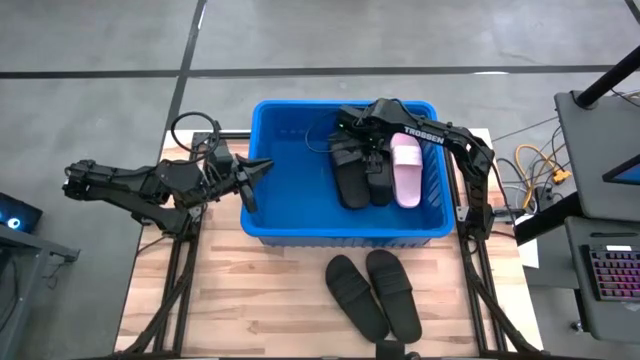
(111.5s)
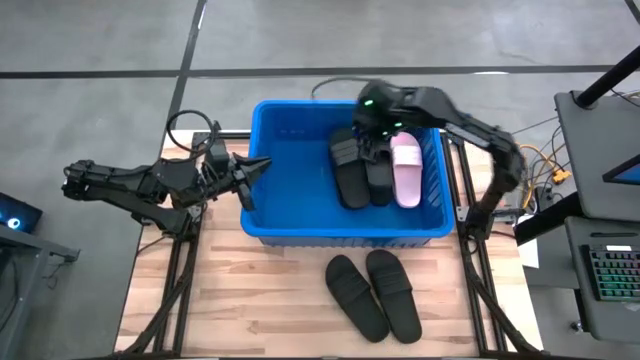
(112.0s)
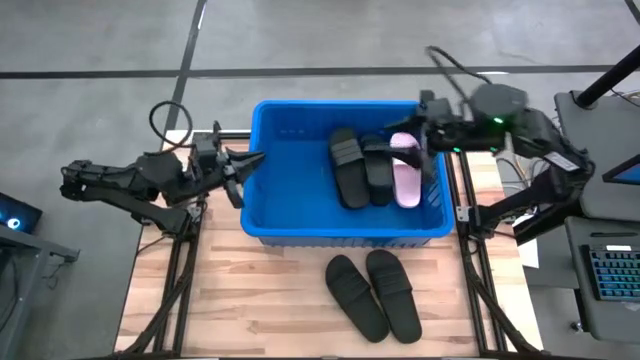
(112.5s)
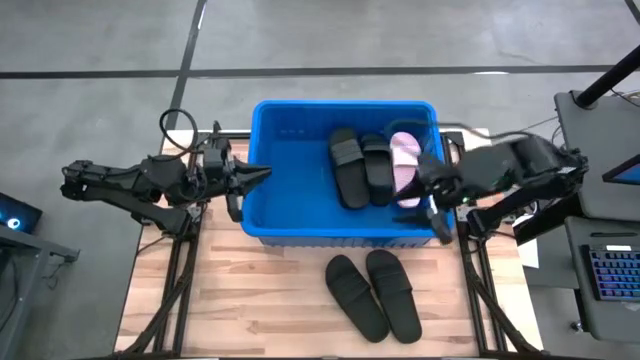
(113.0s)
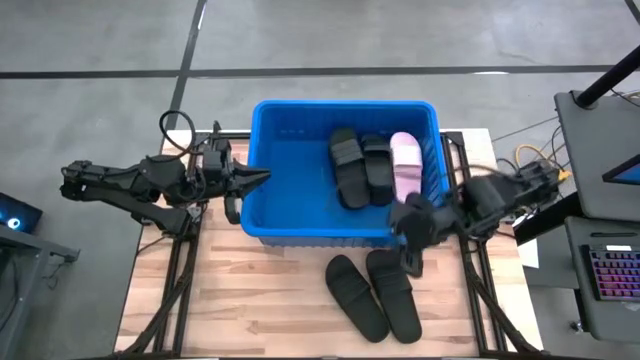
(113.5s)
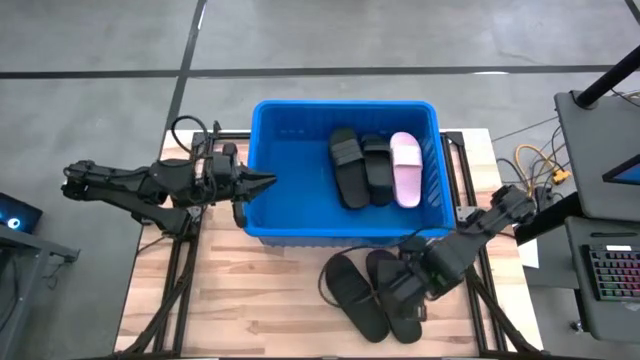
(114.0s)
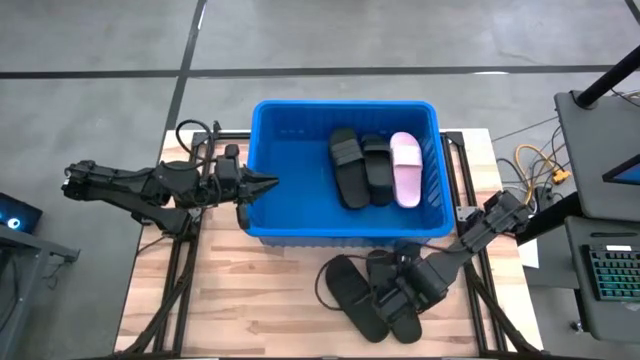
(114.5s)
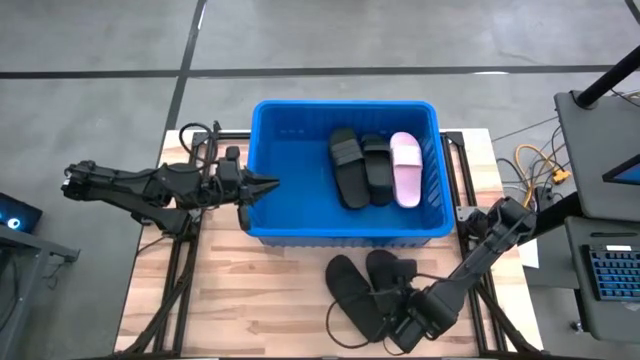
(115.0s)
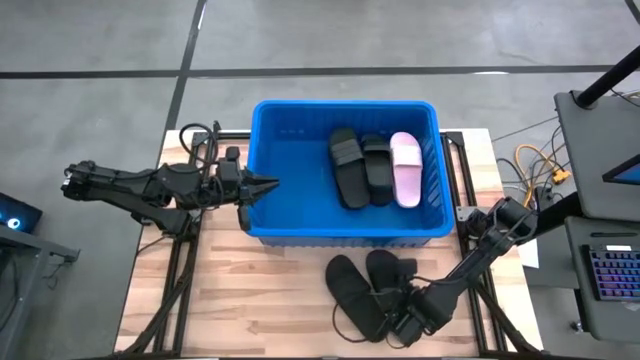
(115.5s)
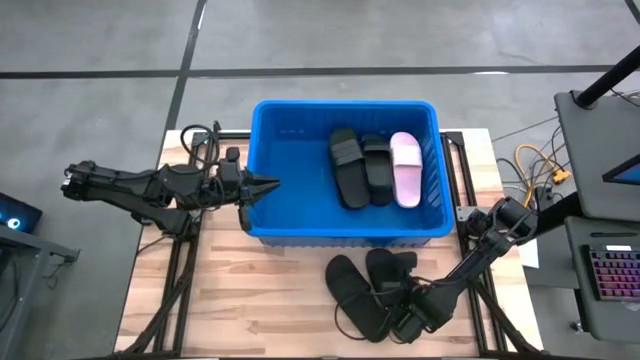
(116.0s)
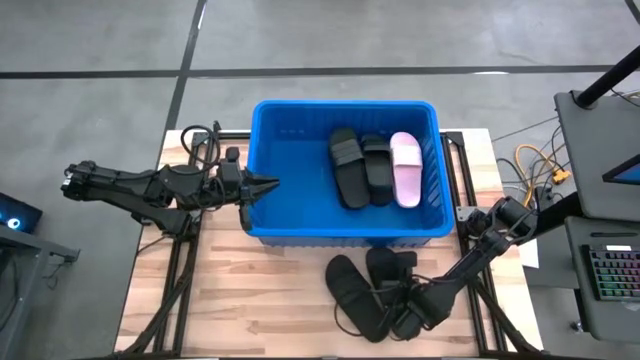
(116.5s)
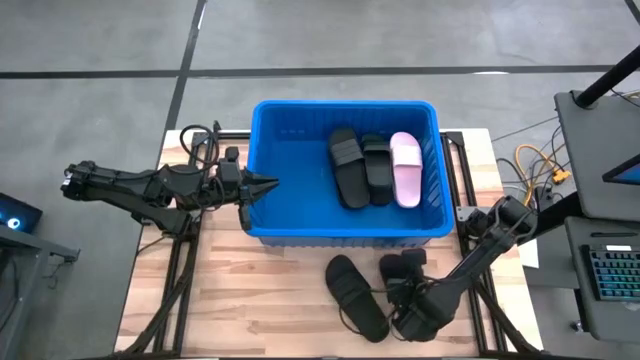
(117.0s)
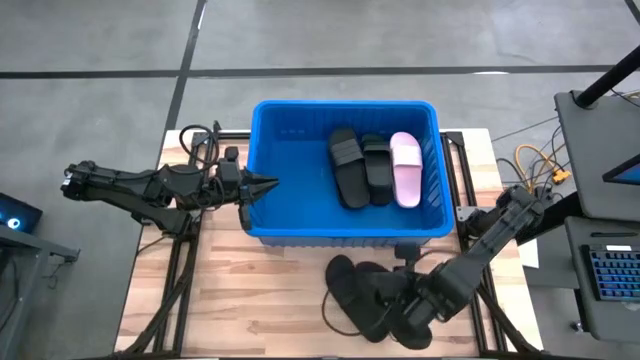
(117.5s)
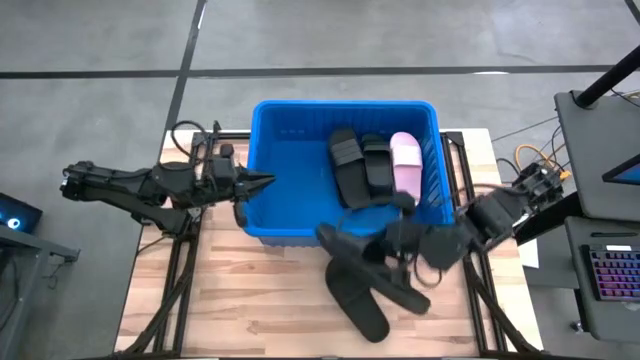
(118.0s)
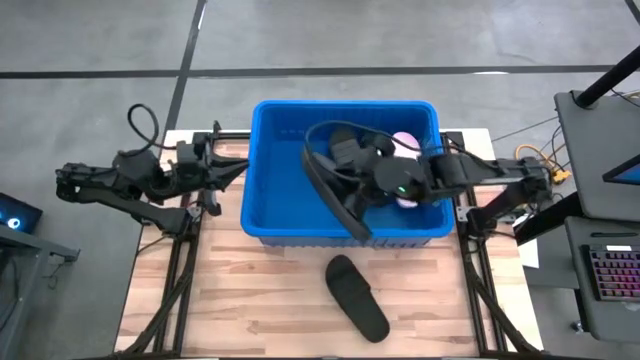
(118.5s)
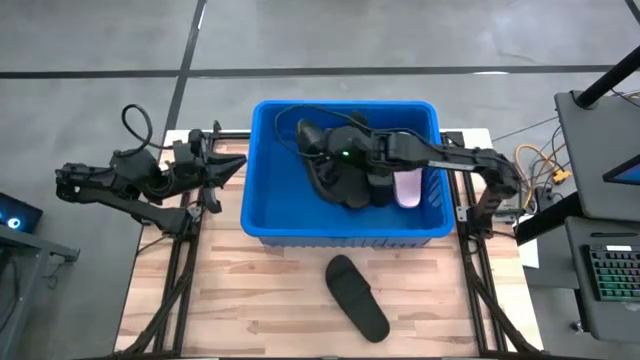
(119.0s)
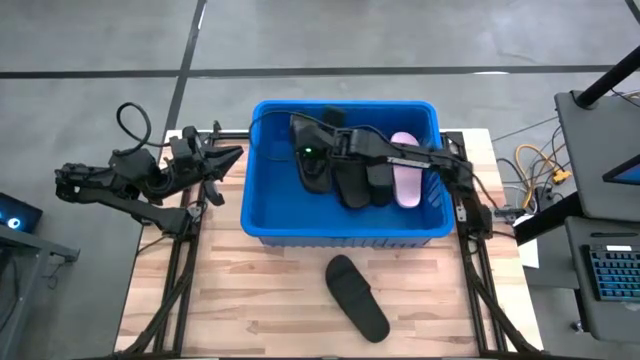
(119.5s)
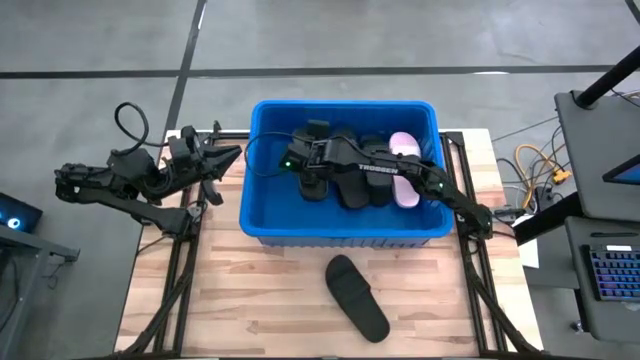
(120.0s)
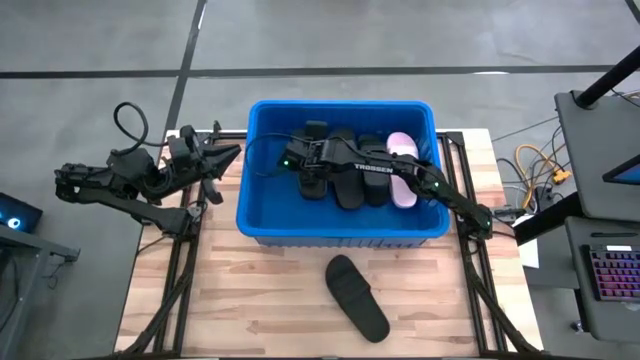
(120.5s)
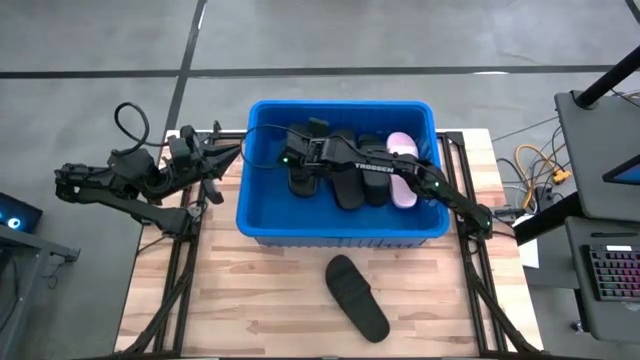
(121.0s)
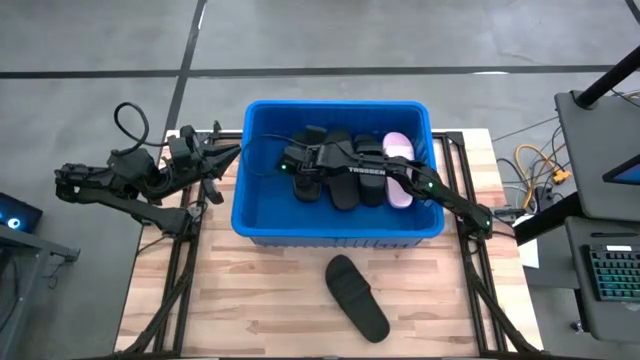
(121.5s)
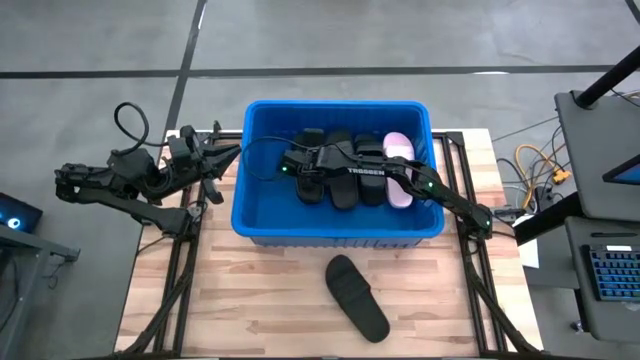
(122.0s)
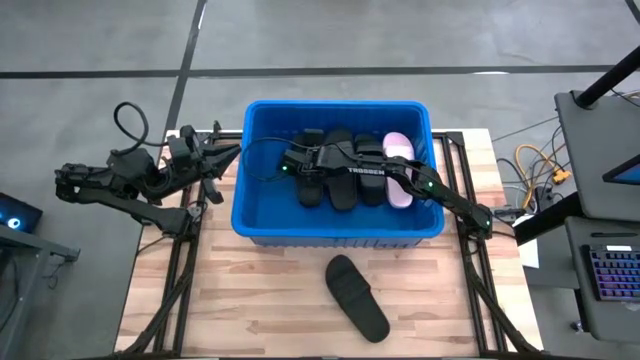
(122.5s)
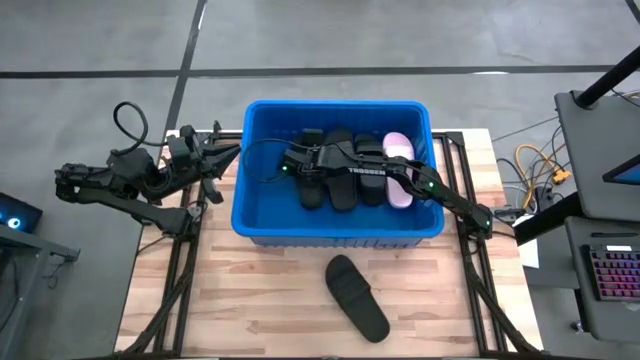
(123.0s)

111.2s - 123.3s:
Task: Pick and place slides into bin
Put the black slide into the blue bin

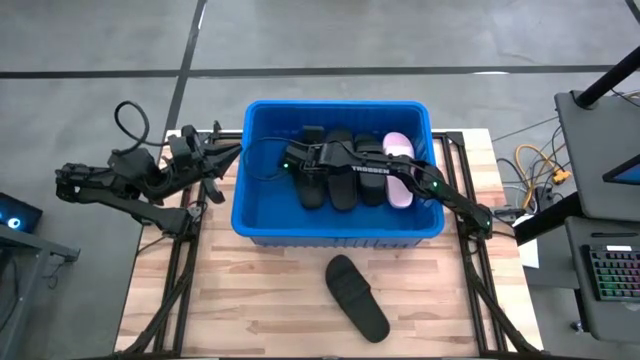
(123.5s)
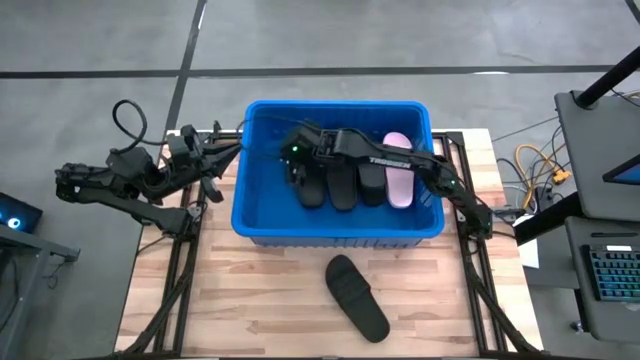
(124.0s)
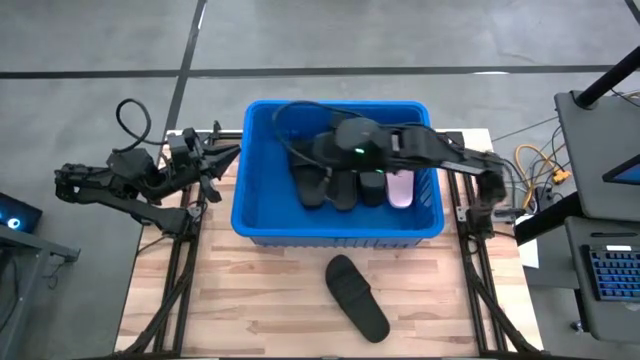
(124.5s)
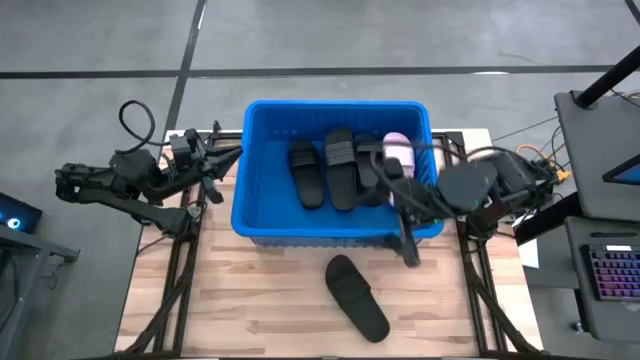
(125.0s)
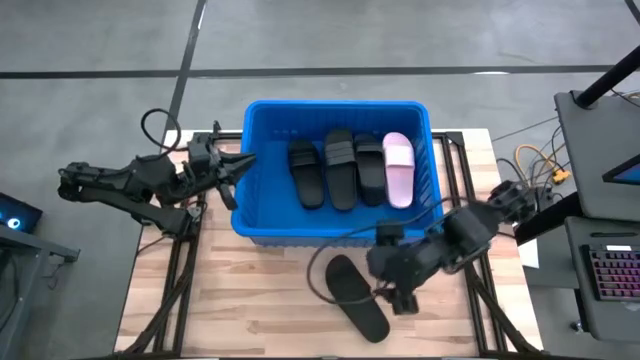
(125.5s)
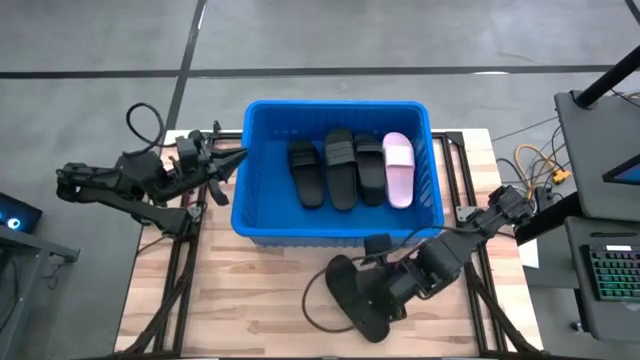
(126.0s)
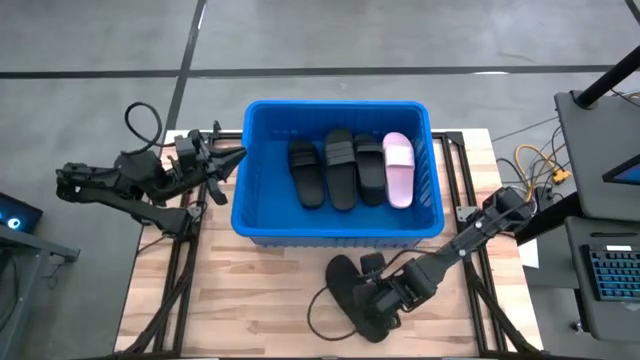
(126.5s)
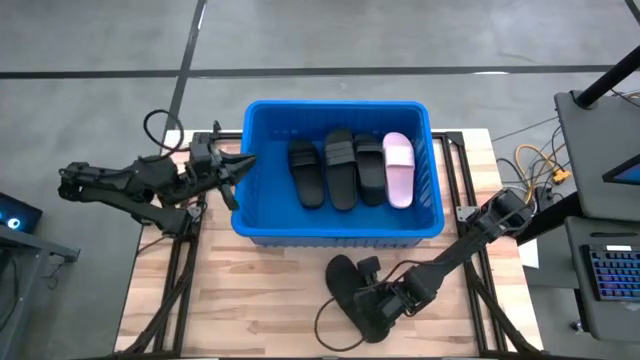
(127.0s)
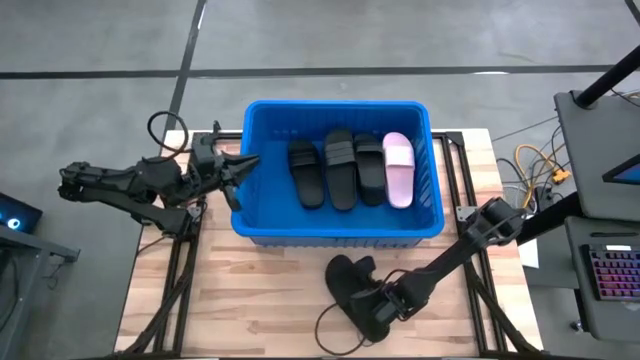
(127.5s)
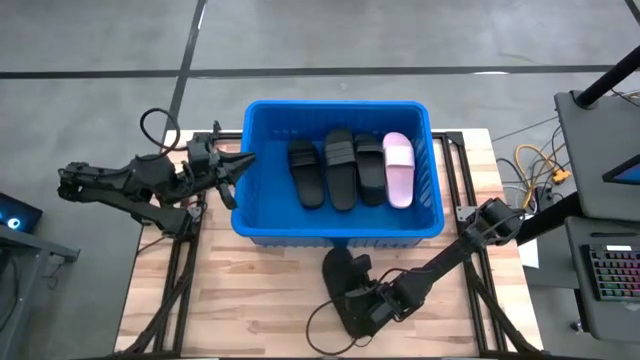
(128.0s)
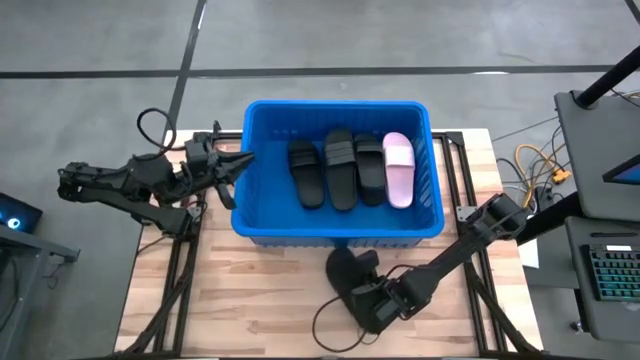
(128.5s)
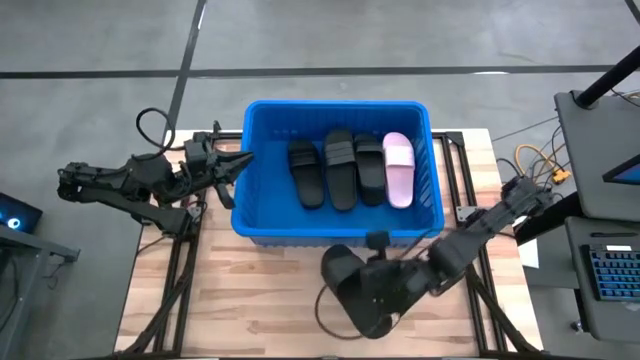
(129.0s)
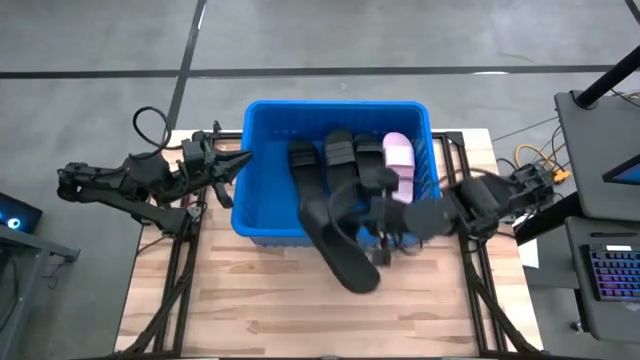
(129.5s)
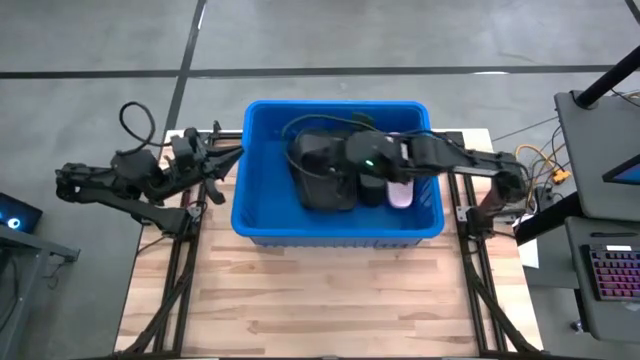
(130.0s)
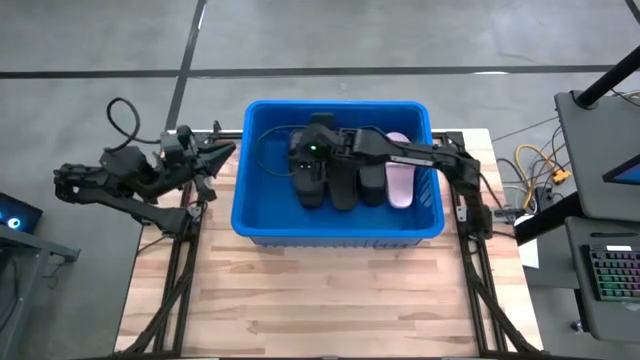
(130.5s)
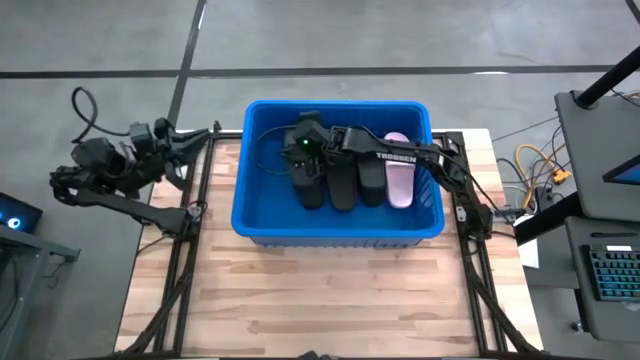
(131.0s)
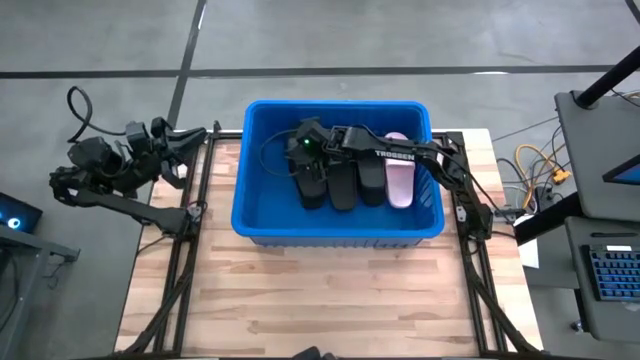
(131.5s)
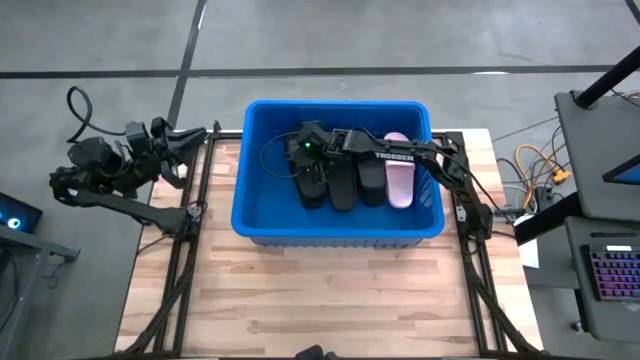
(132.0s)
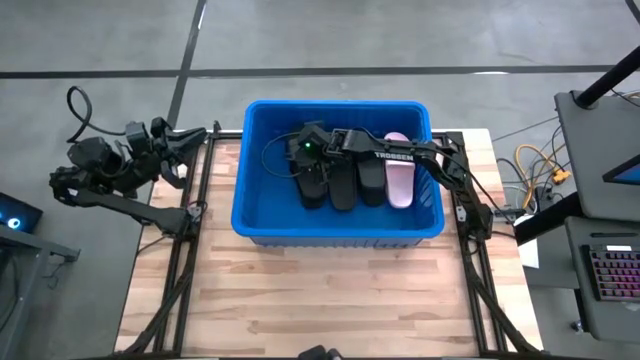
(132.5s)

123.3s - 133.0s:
Put the black slide into the blue bin
